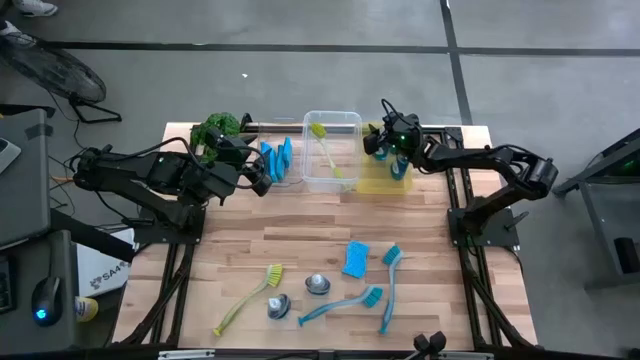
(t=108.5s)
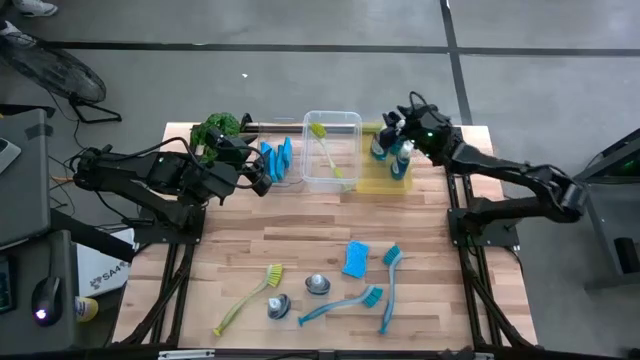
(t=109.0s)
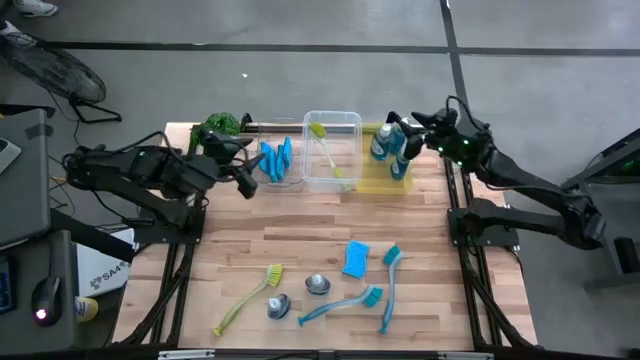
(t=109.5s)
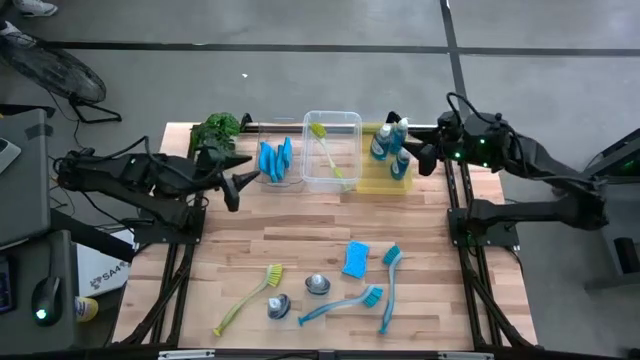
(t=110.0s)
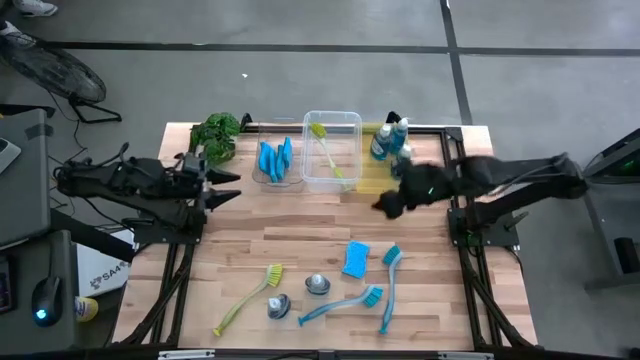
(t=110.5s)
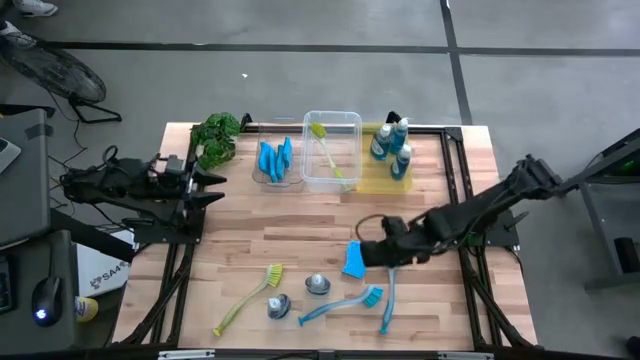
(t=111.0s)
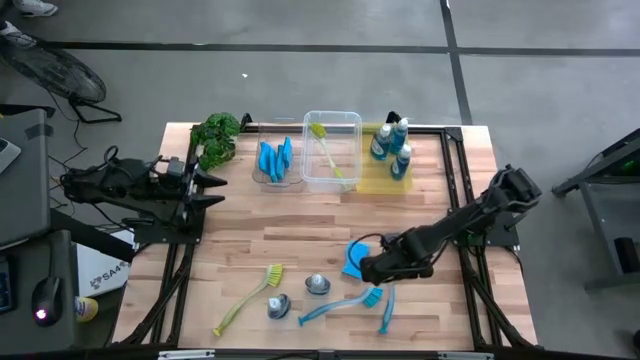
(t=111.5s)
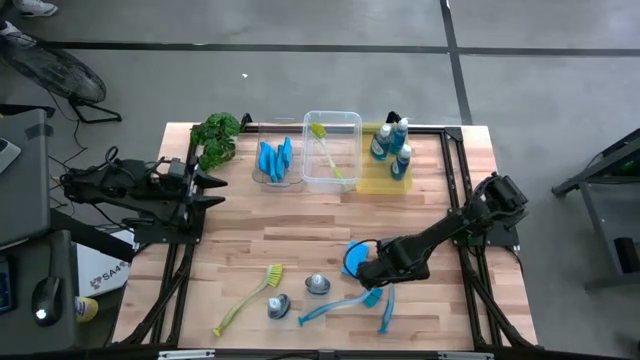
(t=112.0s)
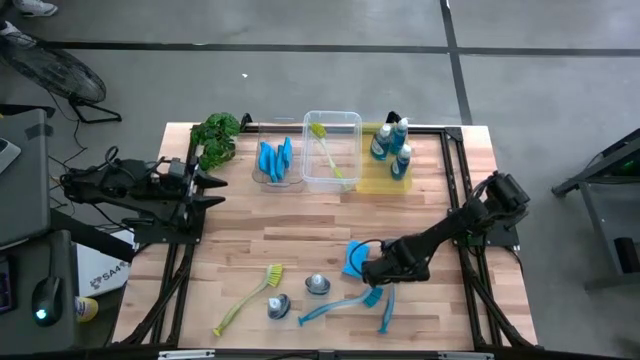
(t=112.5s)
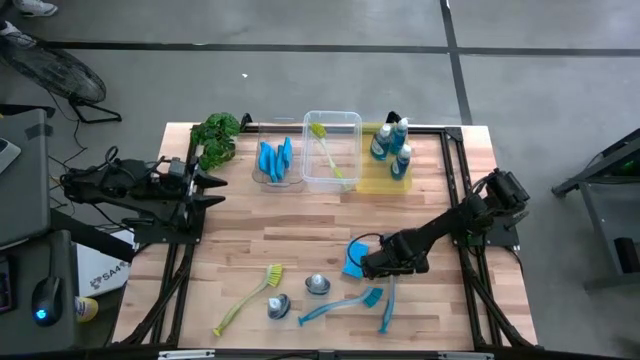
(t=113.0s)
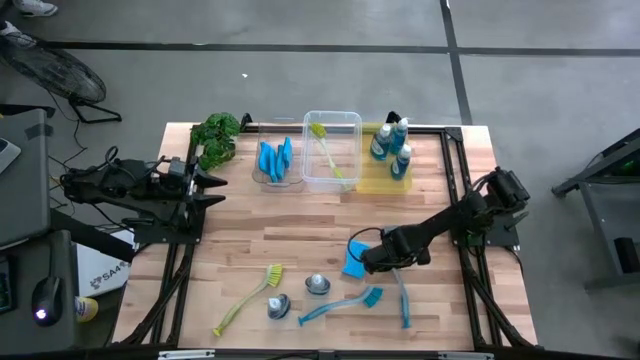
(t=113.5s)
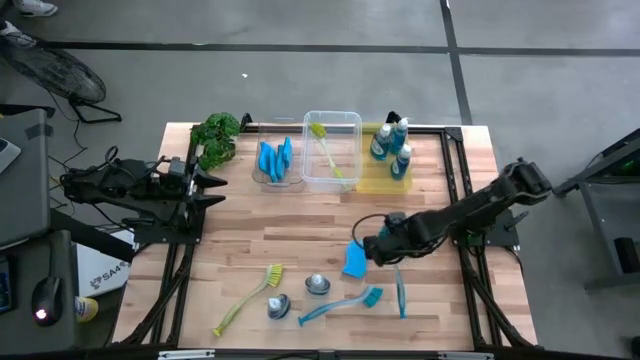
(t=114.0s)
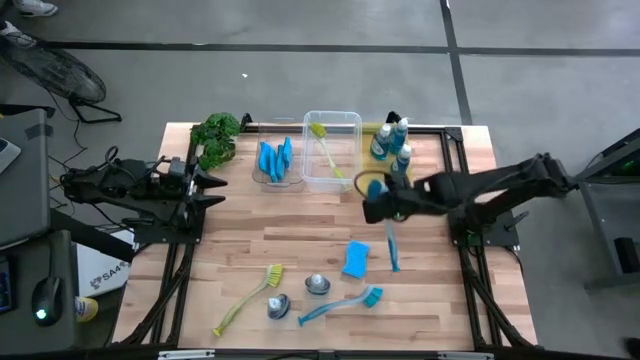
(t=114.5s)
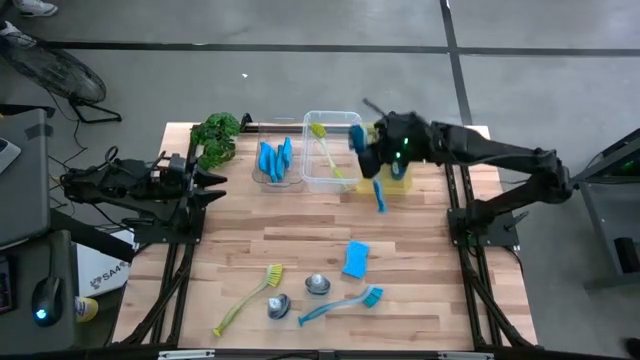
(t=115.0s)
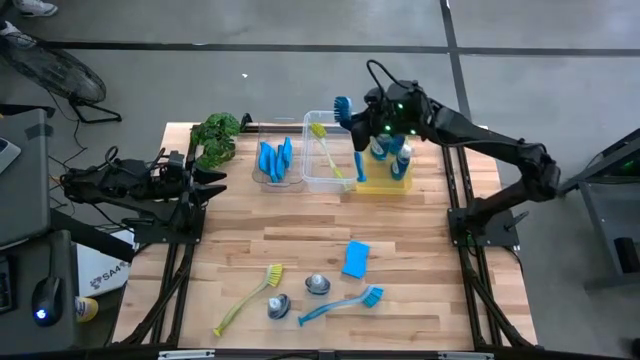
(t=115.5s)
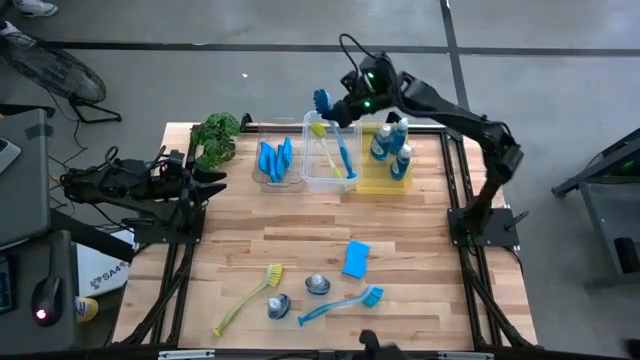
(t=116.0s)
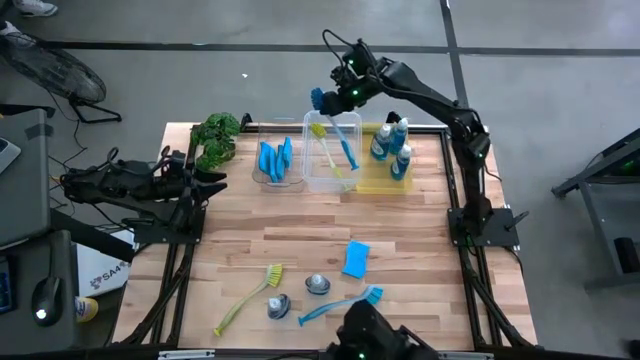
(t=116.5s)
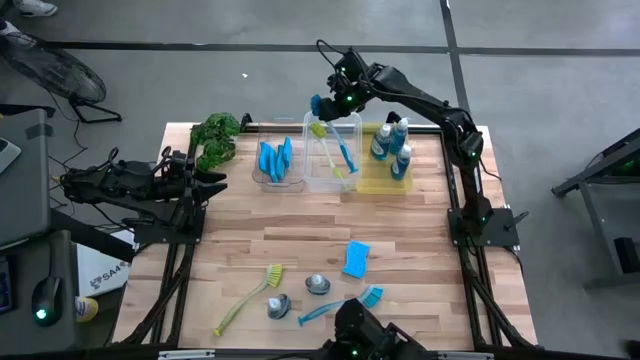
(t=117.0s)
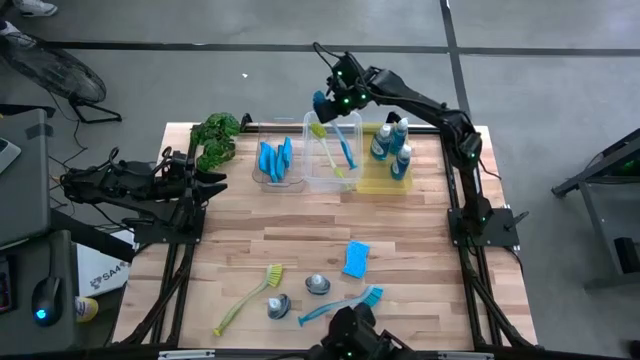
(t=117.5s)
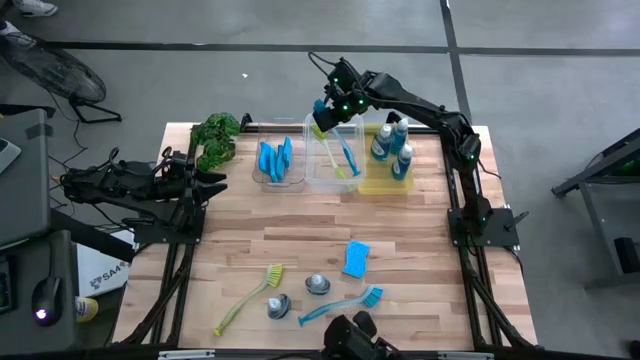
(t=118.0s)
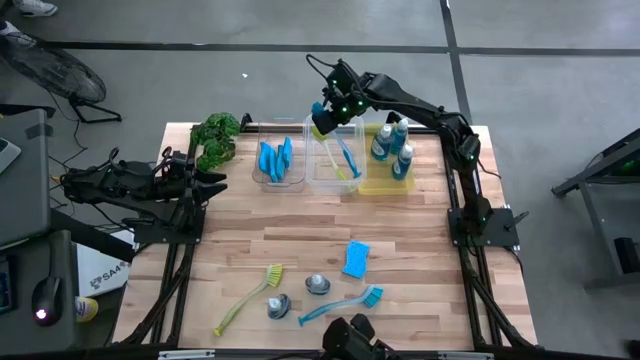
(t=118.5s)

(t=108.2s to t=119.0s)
Task: Pick & Place Kitchen Sink Supplies
Put the right blue dishwashing brush into the white bin

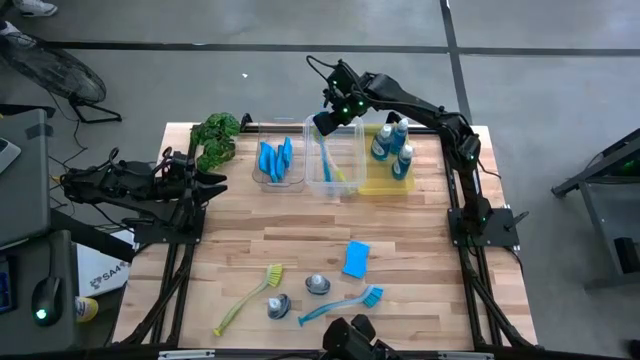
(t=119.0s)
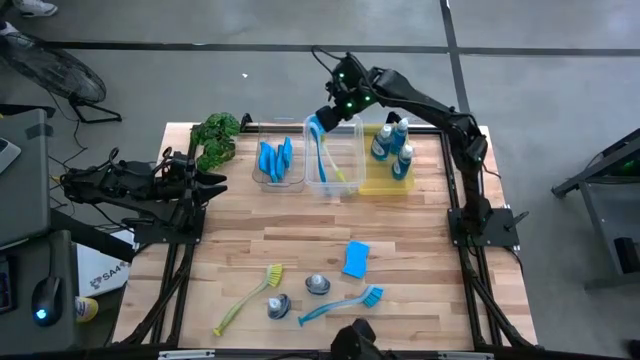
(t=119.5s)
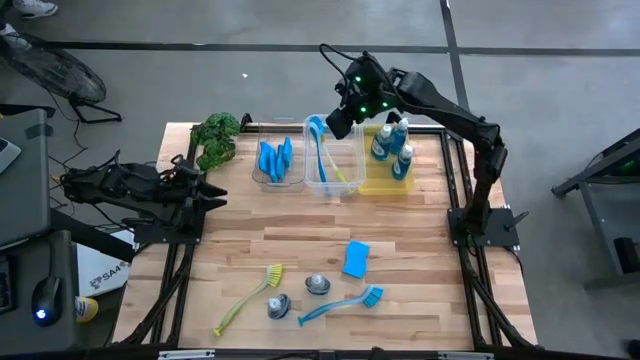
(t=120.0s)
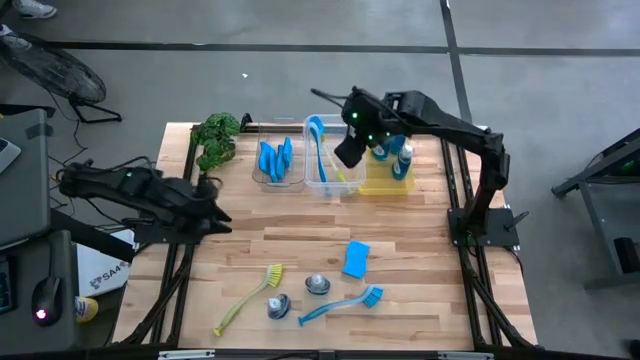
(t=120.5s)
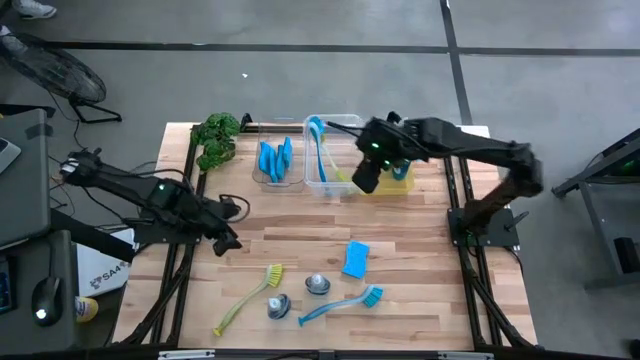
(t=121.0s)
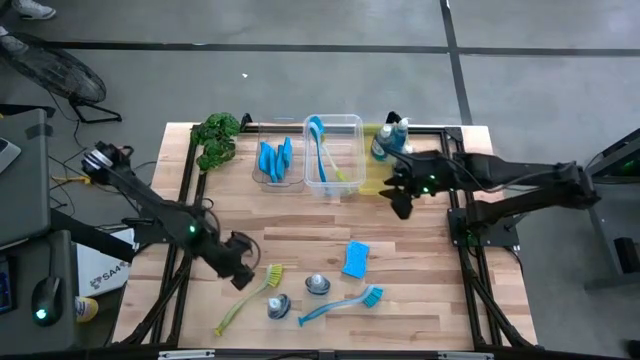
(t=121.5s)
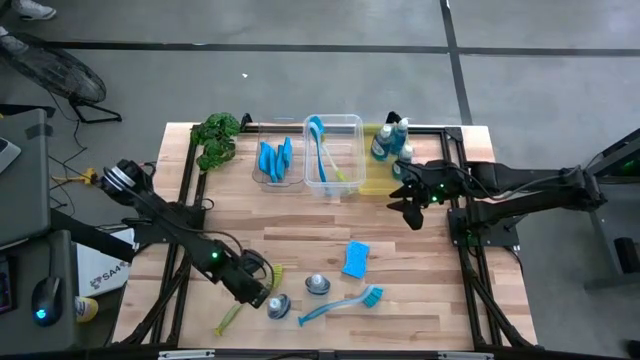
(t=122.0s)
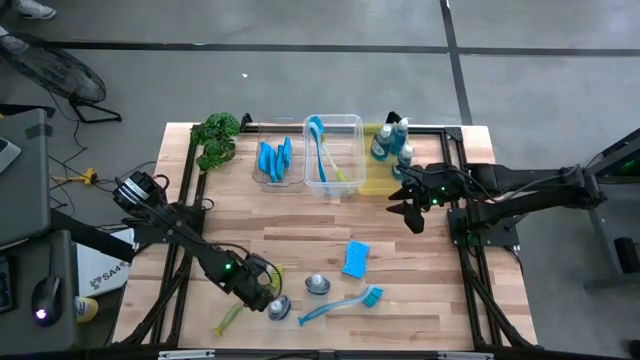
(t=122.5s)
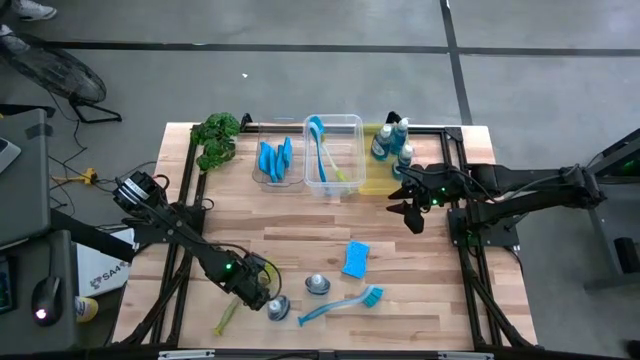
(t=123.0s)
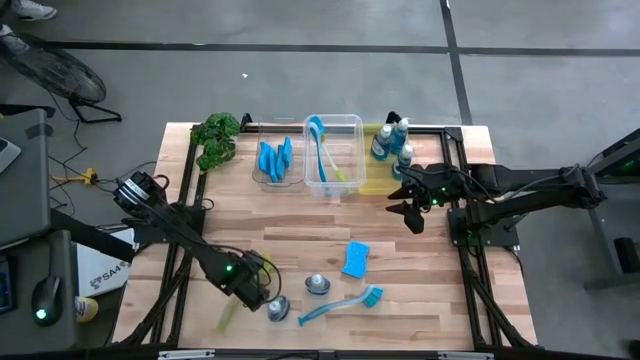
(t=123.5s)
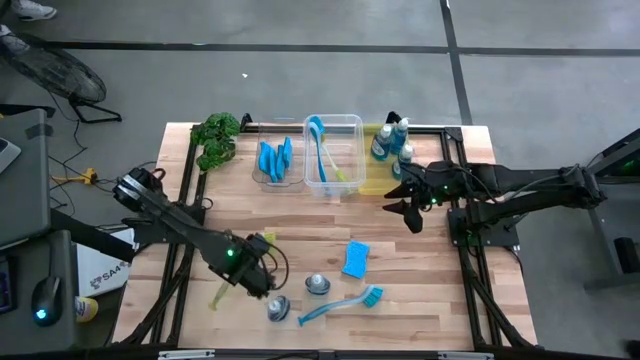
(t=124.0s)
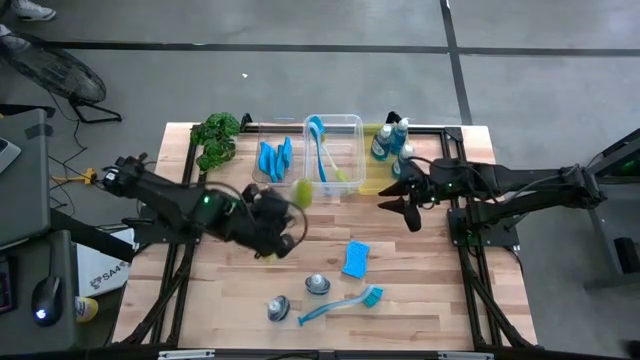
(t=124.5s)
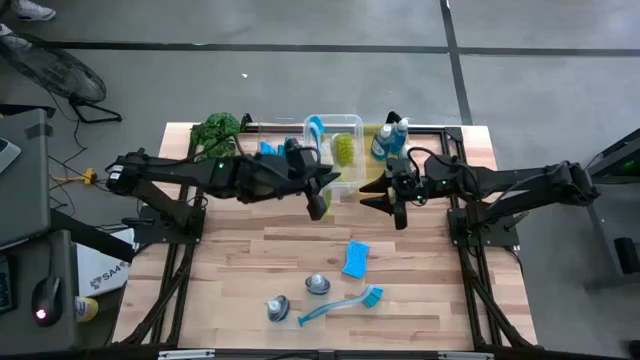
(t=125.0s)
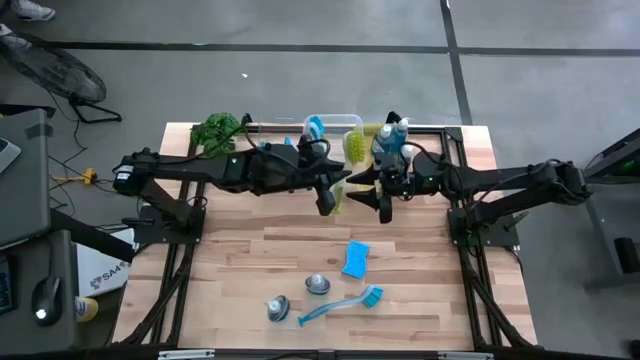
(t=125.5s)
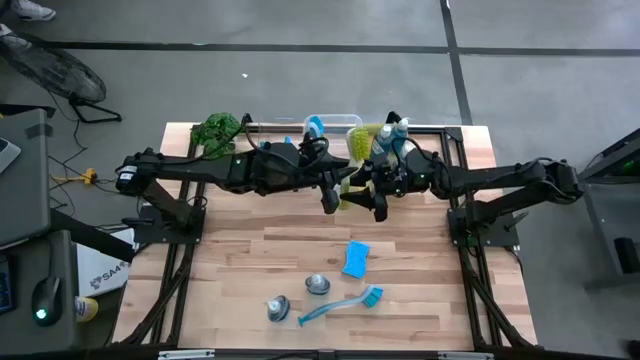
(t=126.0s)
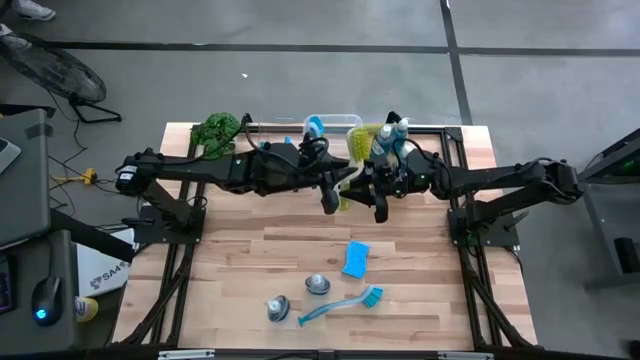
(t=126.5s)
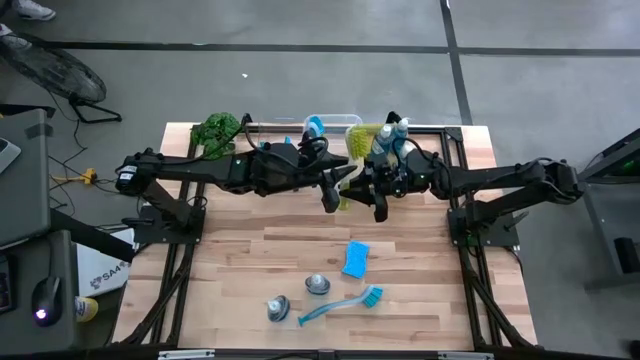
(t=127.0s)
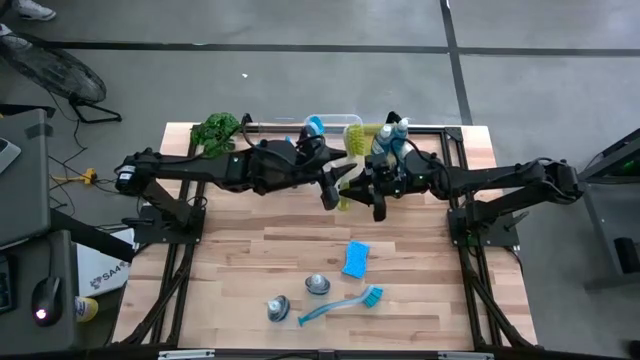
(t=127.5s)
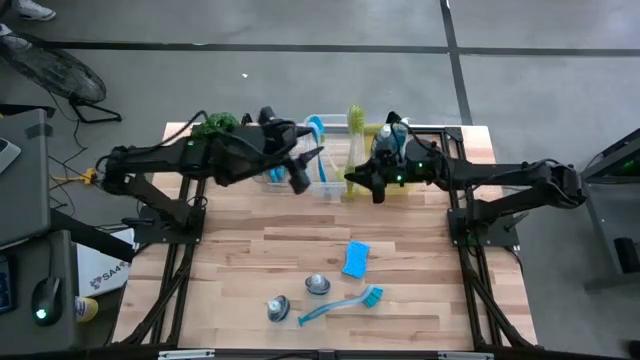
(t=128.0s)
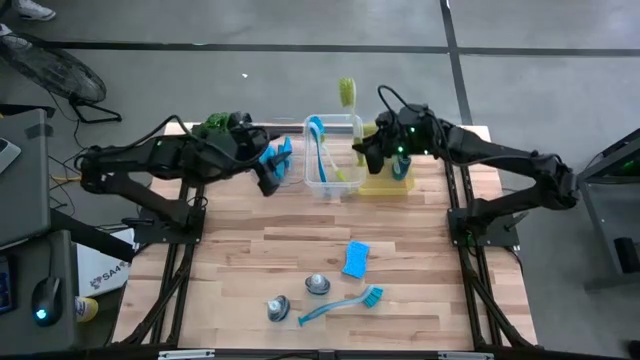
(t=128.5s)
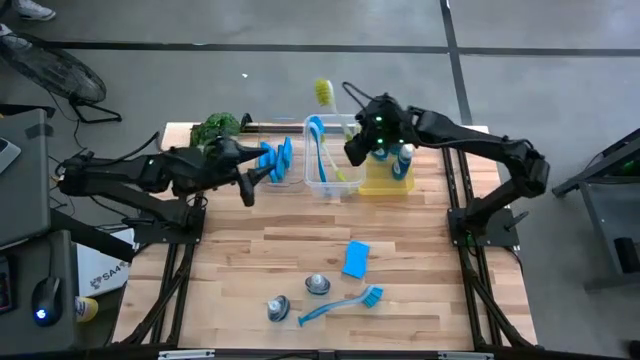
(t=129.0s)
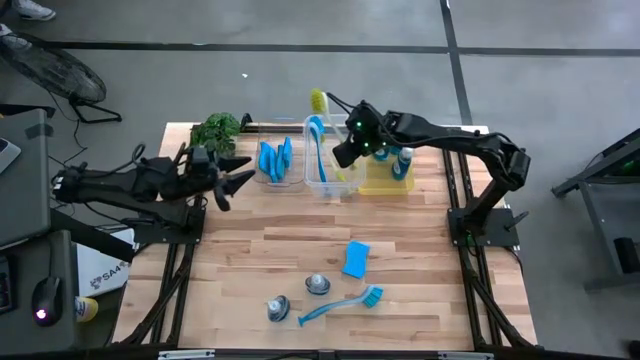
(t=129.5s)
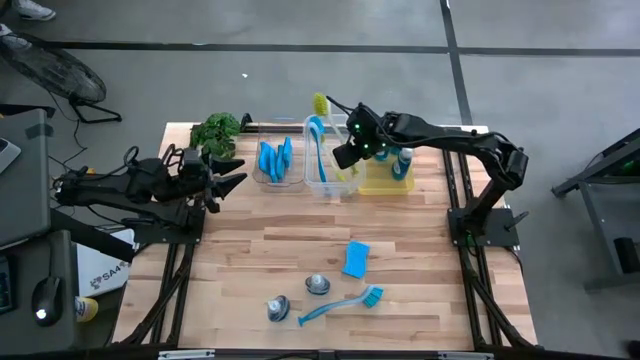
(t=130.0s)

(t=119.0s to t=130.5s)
Put the yellow dishwashing brush into the white bin
